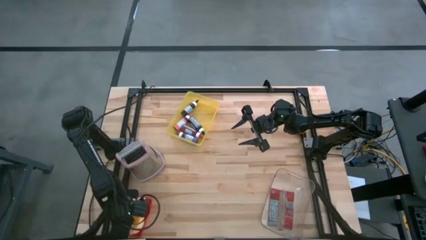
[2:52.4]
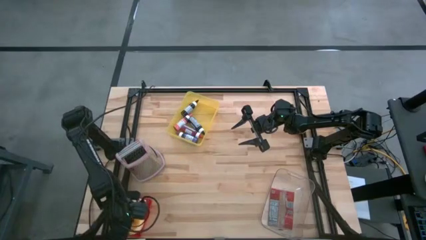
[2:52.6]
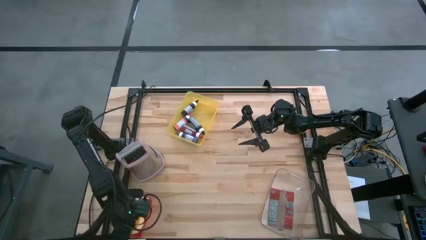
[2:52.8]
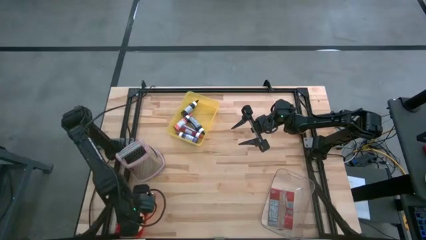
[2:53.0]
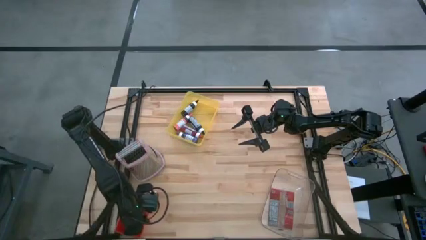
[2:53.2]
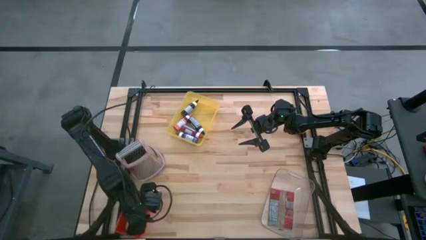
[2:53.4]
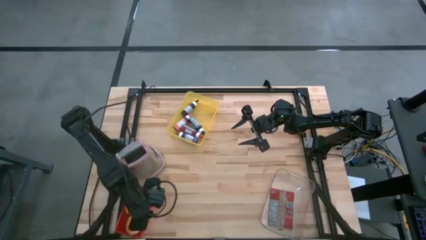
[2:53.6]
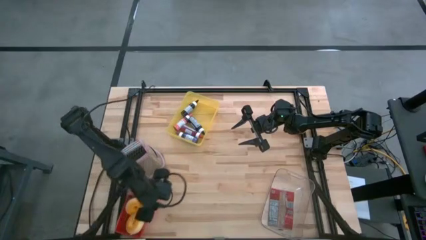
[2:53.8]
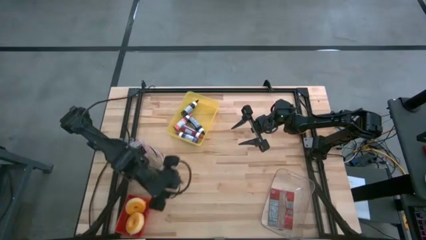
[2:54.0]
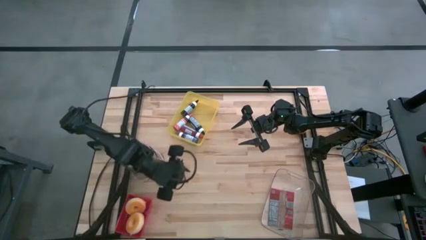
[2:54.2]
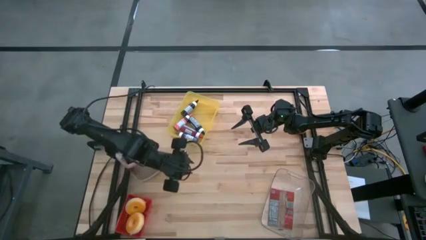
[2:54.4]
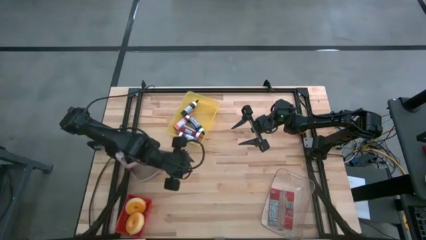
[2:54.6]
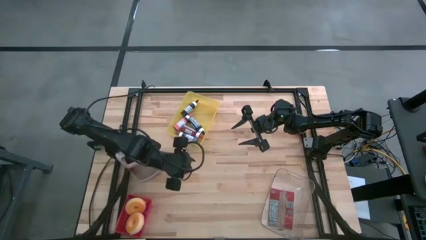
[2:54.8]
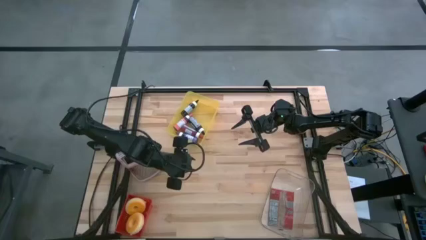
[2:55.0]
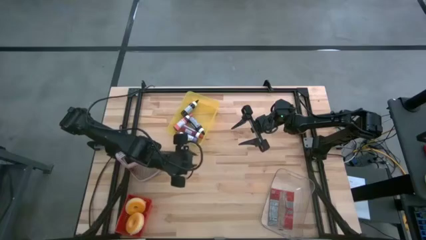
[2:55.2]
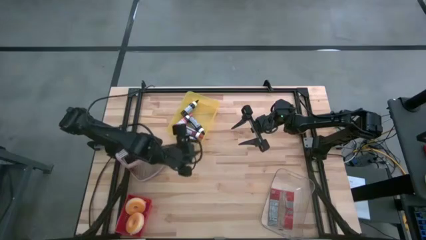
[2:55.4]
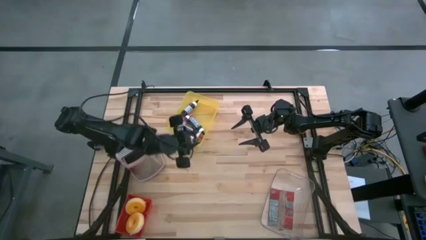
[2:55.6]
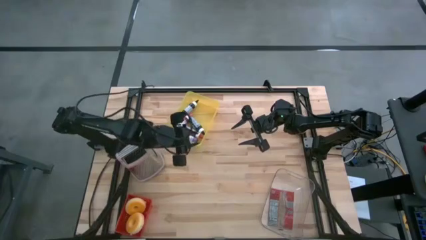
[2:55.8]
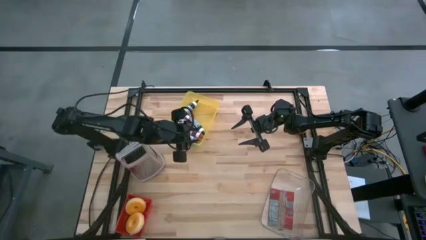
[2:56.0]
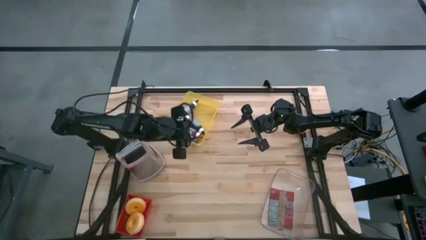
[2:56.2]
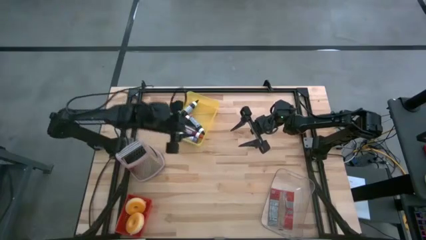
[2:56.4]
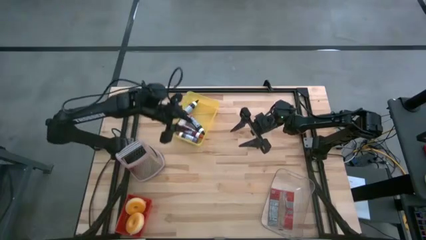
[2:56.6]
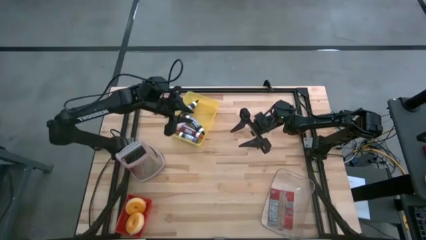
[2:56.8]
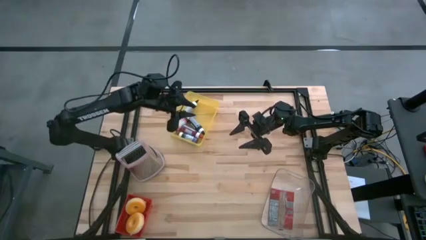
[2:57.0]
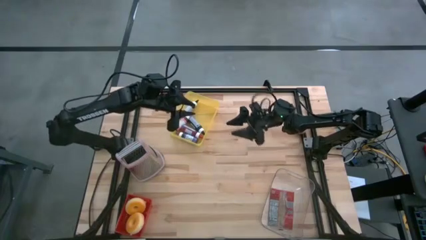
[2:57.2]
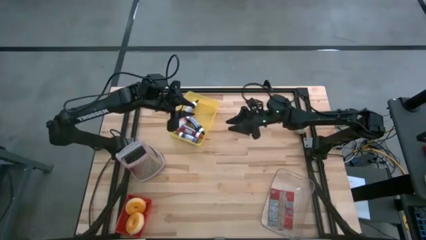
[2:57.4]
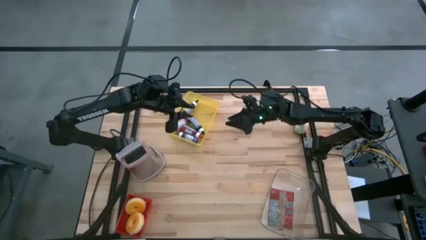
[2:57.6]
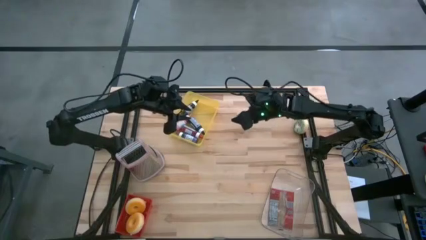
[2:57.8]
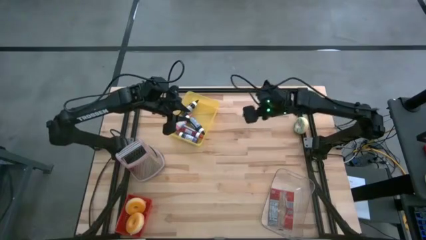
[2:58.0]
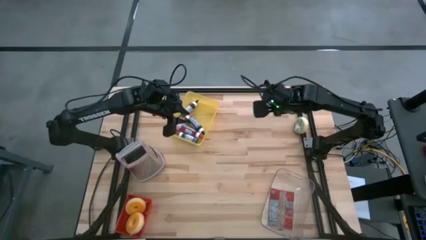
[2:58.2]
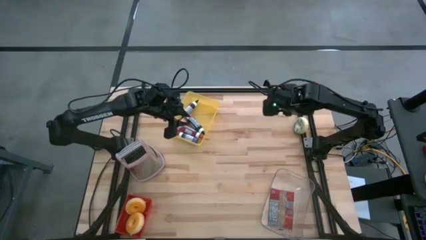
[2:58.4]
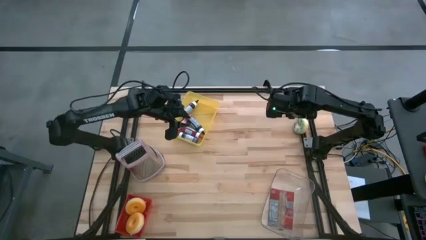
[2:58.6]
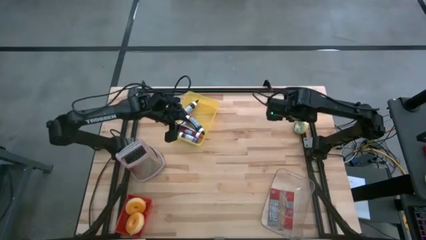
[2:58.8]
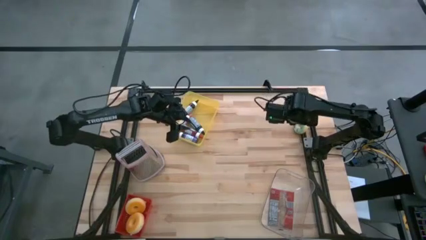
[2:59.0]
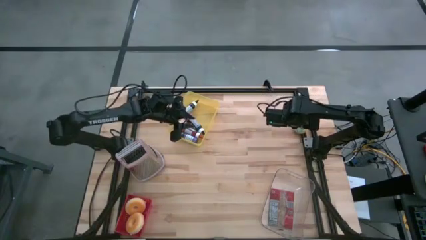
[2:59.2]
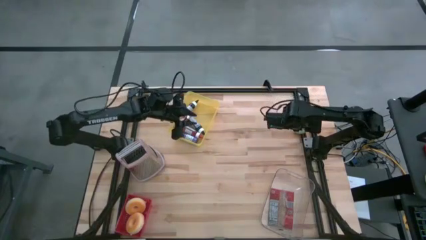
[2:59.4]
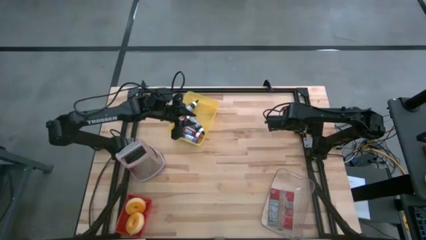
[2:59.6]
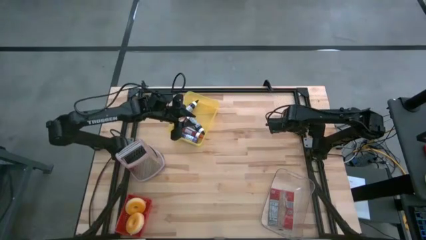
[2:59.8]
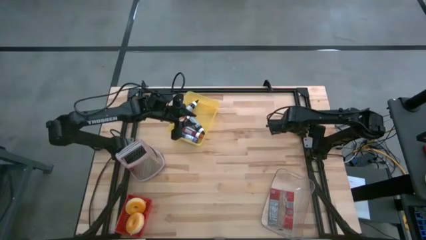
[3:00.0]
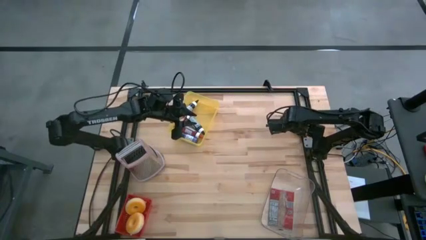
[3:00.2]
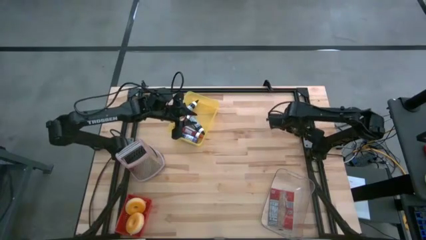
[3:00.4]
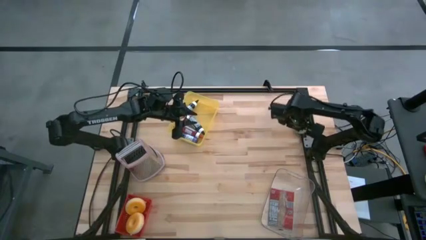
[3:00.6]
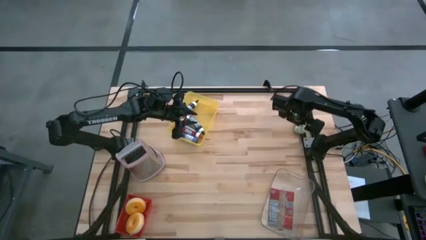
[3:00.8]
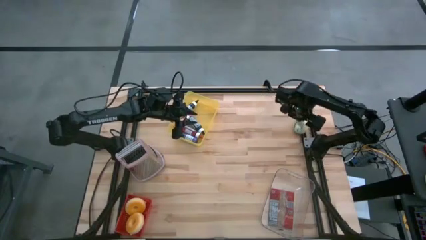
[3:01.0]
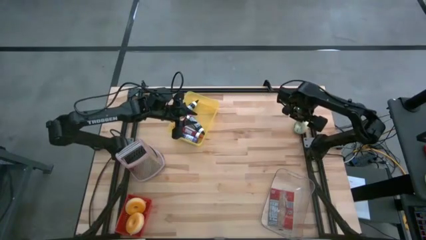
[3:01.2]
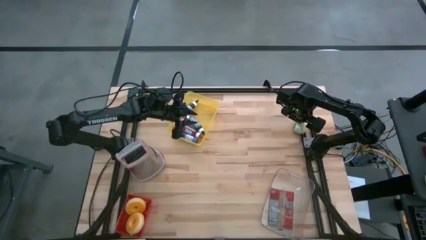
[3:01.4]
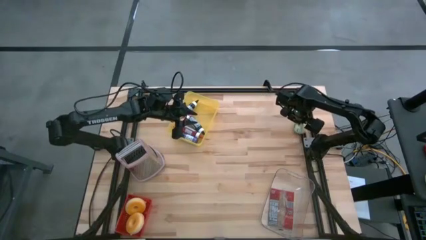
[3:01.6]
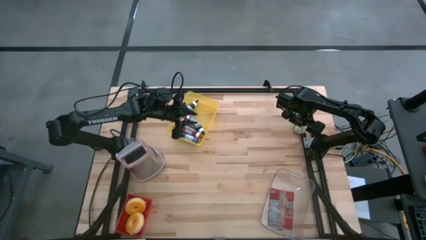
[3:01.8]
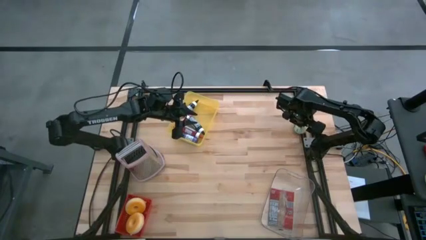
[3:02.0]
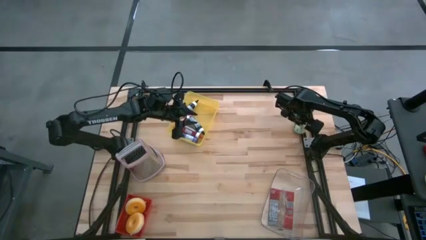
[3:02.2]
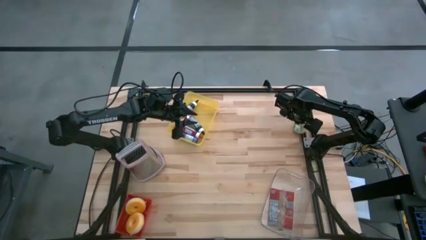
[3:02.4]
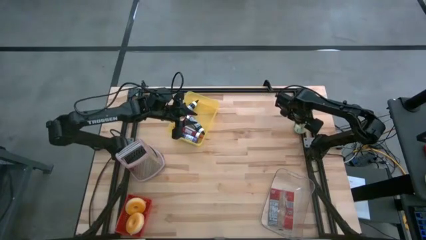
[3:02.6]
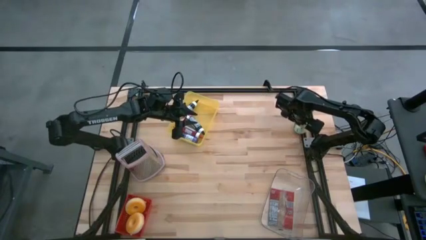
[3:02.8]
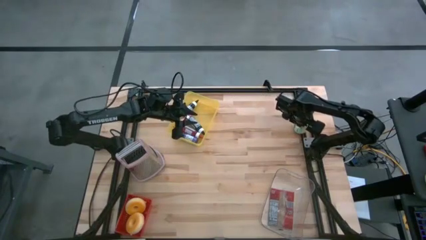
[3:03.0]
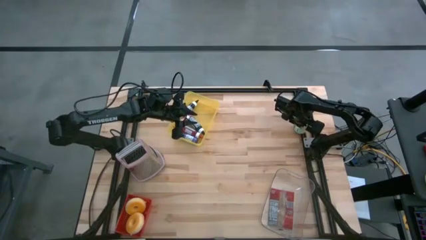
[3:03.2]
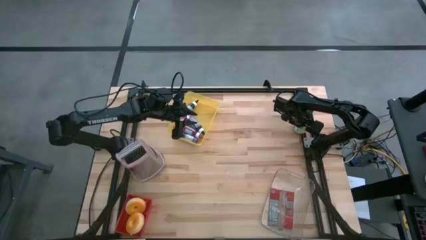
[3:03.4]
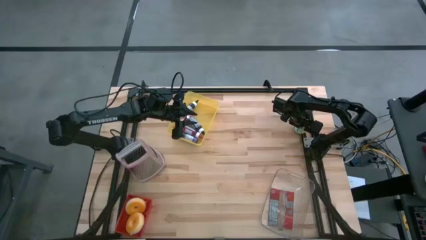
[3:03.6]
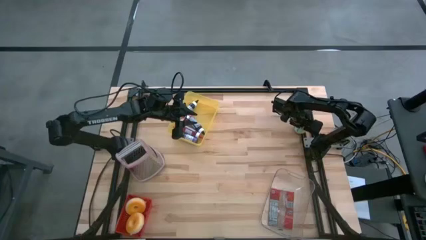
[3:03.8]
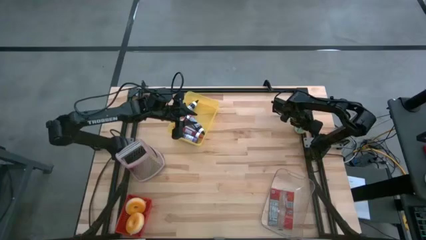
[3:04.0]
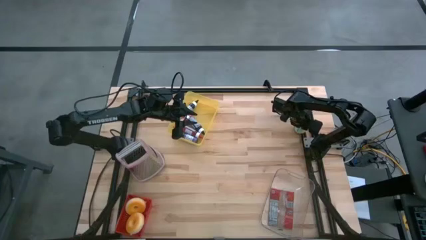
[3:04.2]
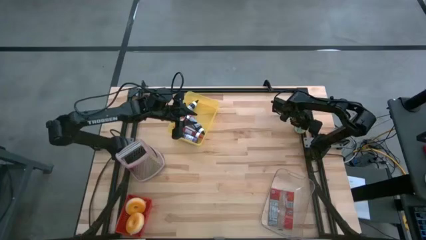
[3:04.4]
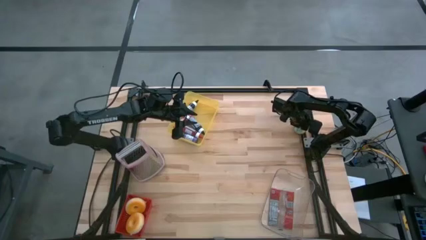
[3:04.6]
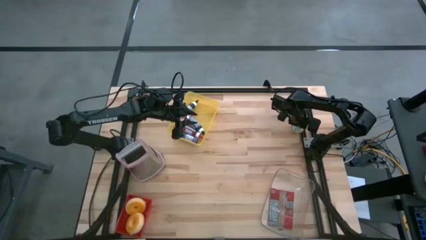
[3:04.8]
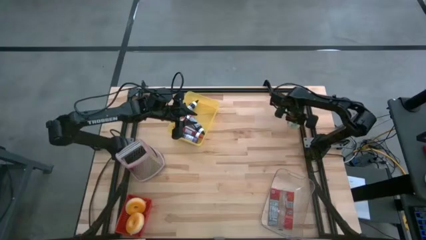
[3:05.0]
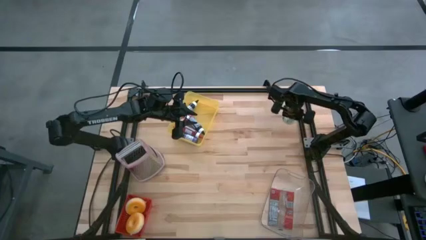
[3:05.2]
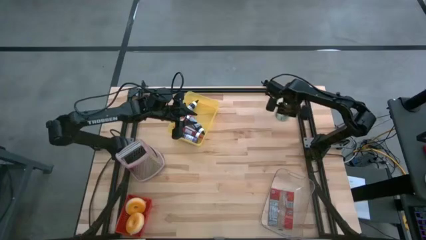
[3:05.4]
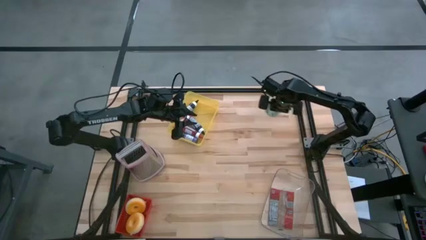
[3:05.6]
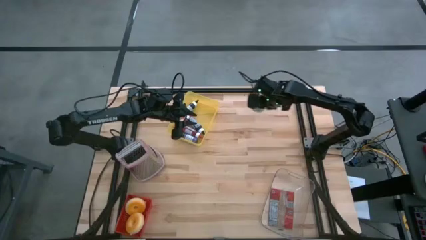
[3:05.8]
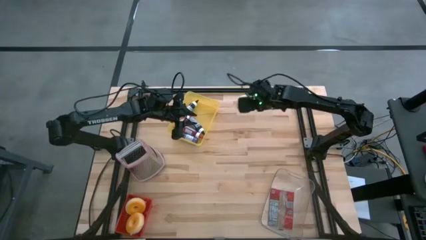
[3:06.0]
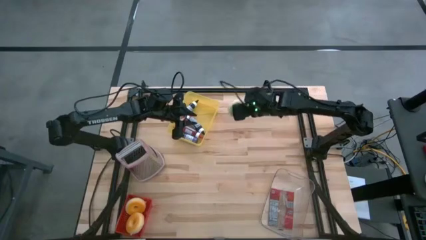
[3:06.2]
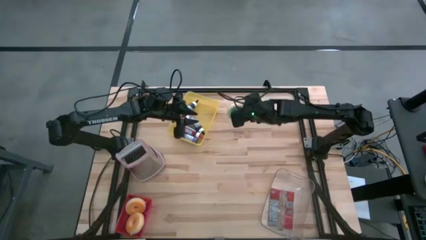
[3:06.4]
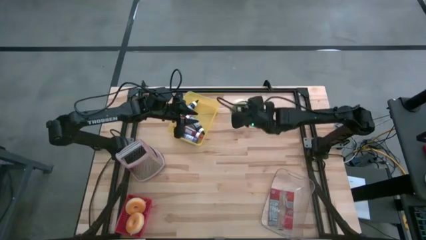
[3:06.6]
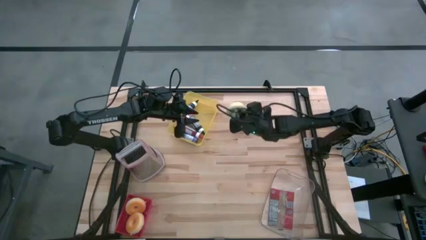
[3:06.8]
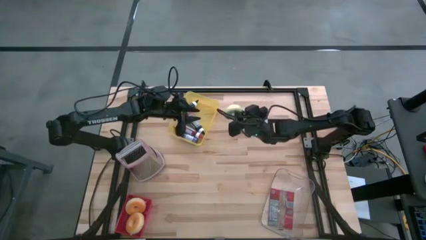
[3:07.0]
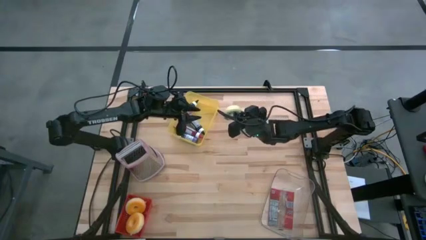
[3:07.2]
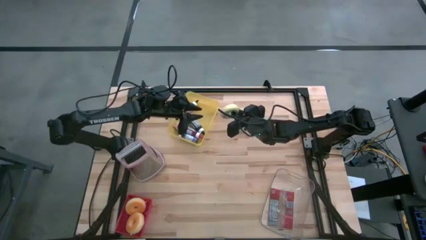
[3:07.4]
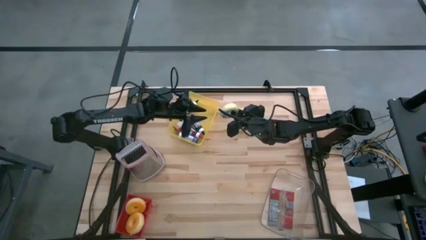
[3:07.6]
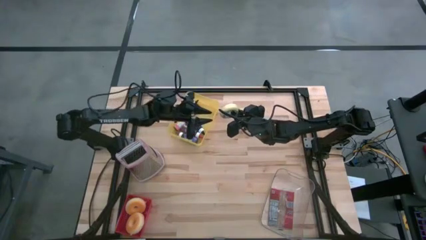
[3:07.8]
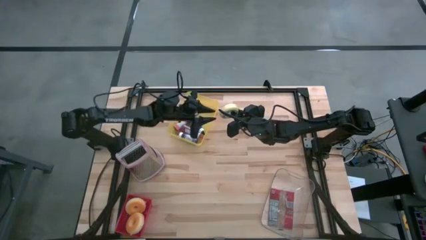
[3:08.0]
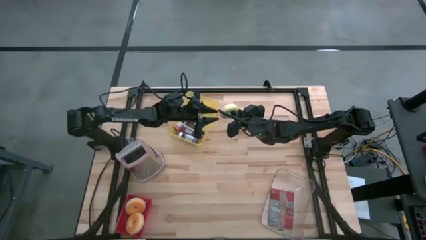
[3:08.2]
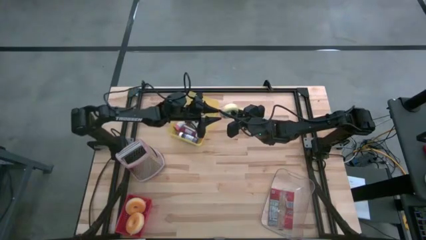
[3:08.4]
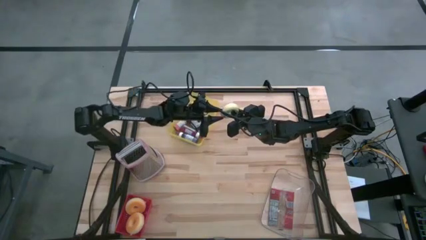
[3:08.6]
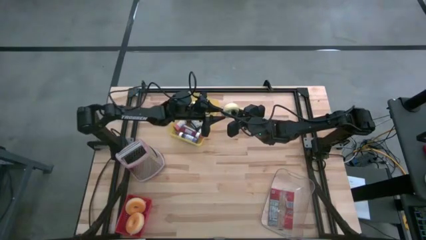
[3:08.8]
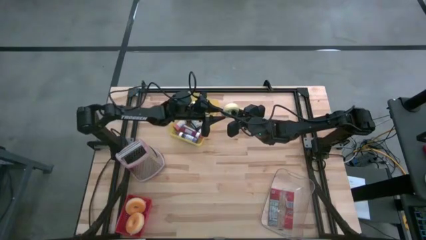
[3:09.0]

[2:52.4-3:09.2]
Task: Pick & Place Food Item
Put the blue donut into the red bin
